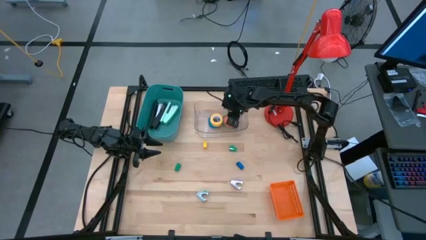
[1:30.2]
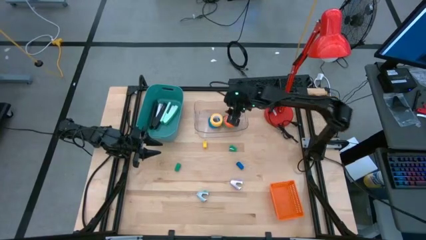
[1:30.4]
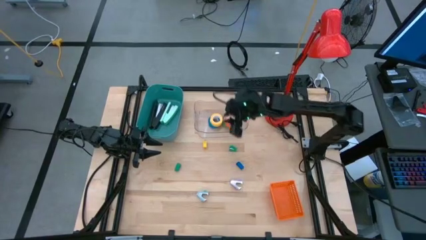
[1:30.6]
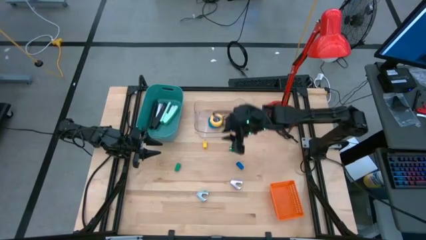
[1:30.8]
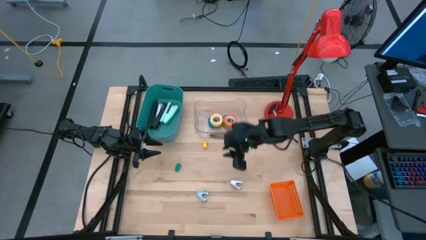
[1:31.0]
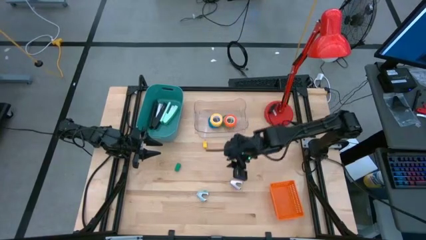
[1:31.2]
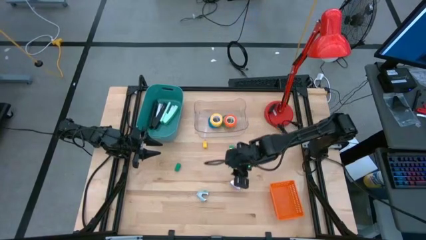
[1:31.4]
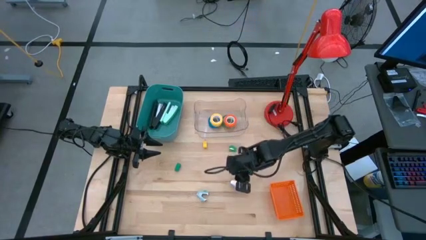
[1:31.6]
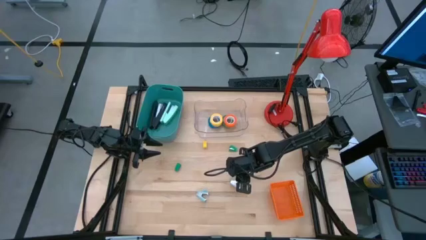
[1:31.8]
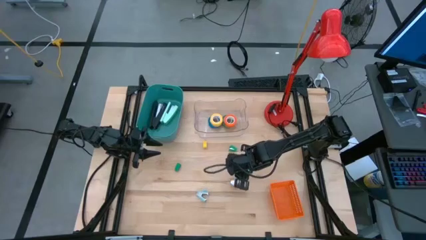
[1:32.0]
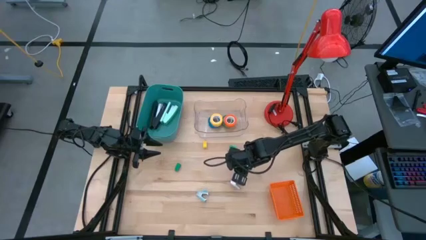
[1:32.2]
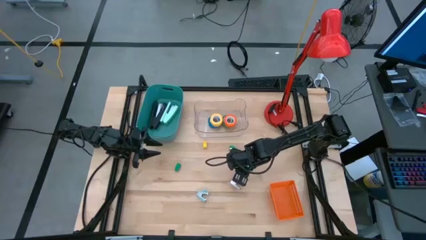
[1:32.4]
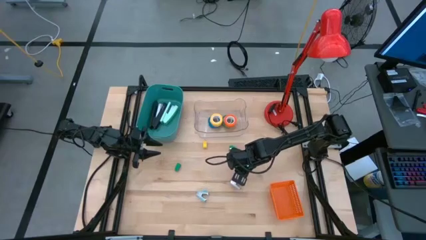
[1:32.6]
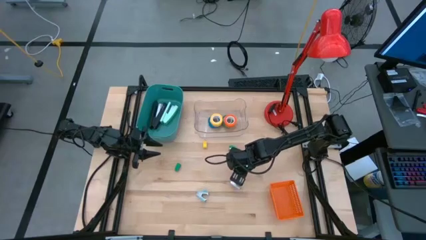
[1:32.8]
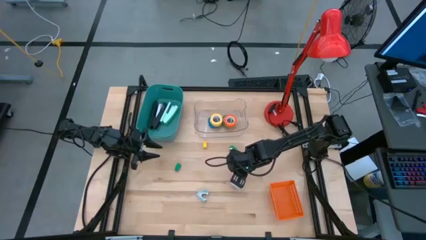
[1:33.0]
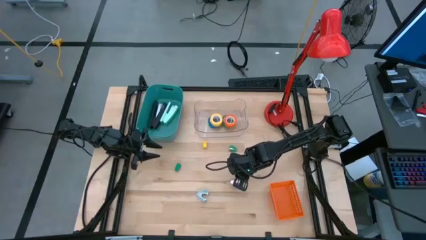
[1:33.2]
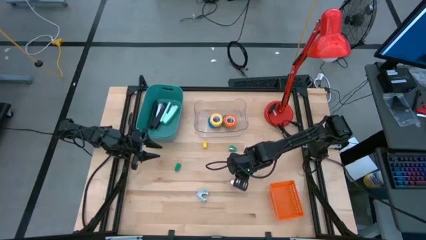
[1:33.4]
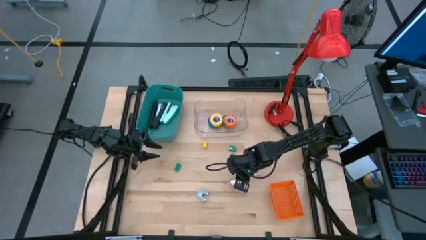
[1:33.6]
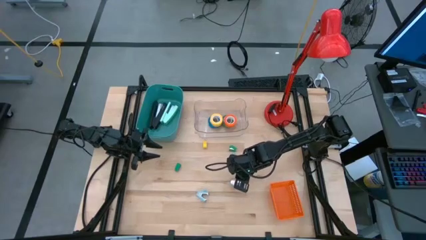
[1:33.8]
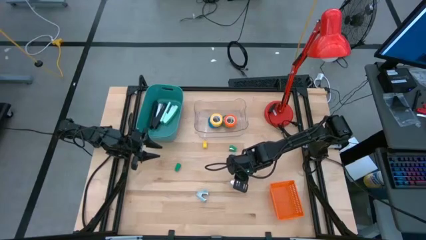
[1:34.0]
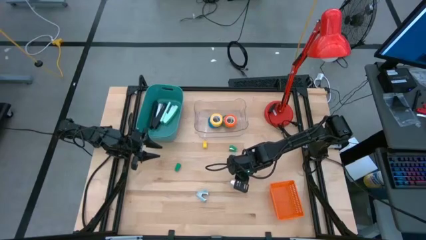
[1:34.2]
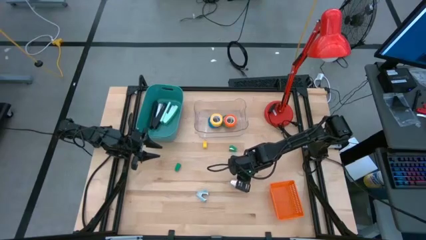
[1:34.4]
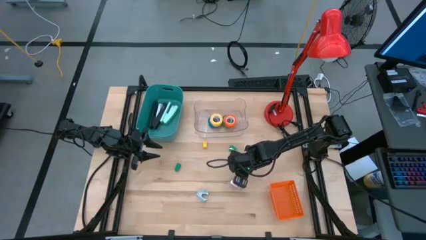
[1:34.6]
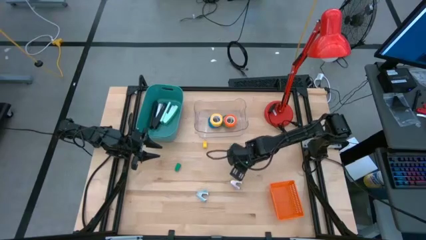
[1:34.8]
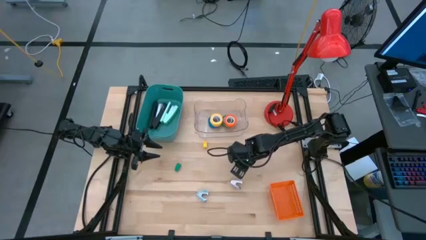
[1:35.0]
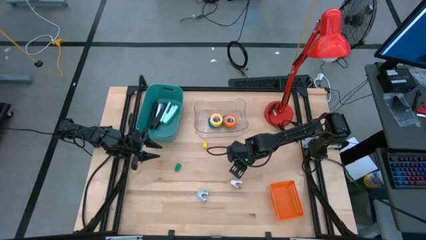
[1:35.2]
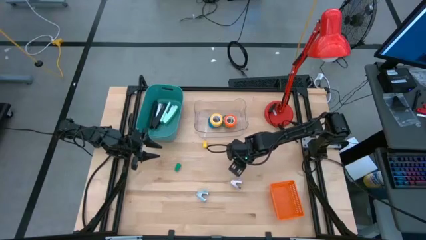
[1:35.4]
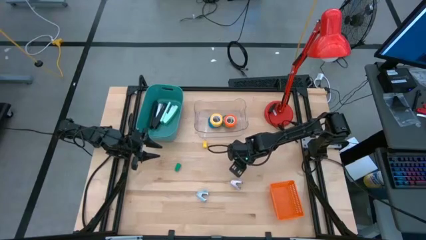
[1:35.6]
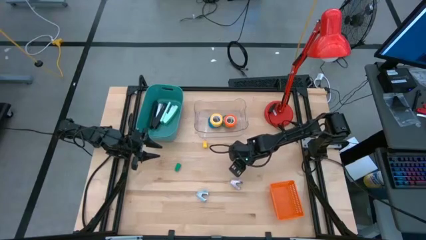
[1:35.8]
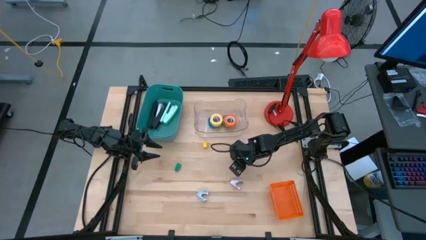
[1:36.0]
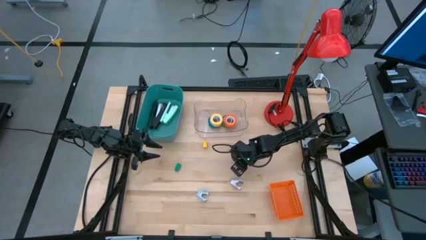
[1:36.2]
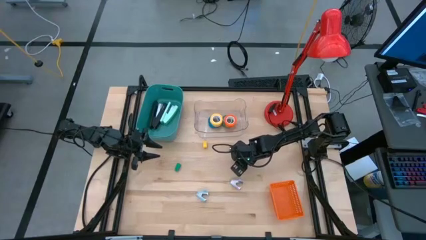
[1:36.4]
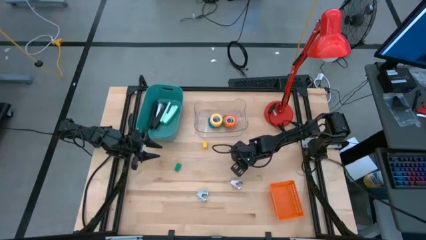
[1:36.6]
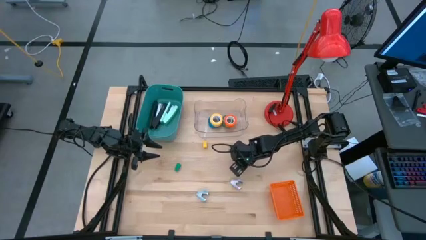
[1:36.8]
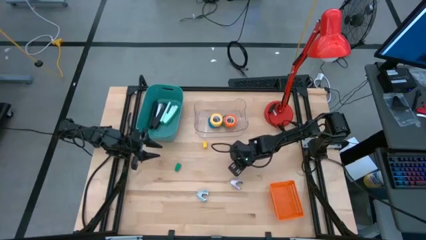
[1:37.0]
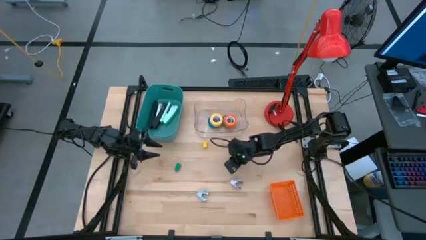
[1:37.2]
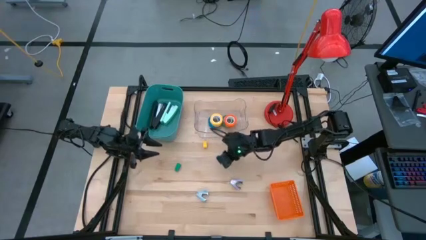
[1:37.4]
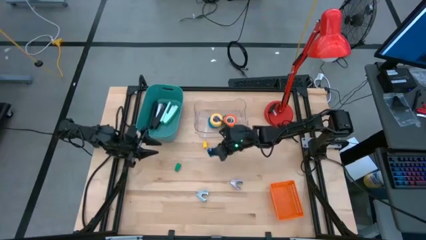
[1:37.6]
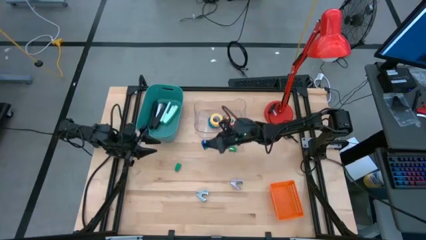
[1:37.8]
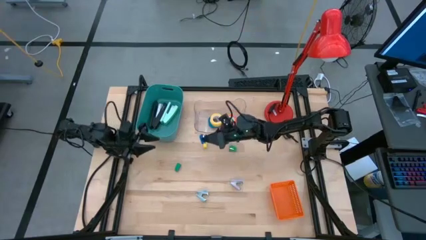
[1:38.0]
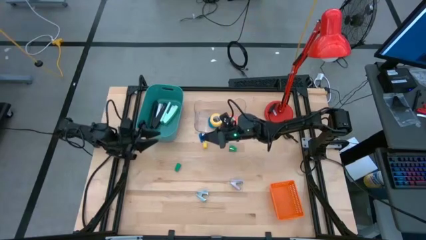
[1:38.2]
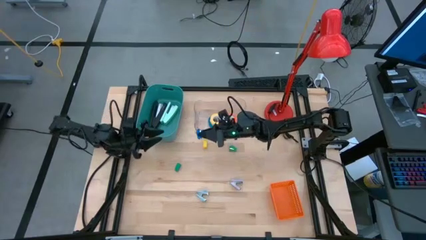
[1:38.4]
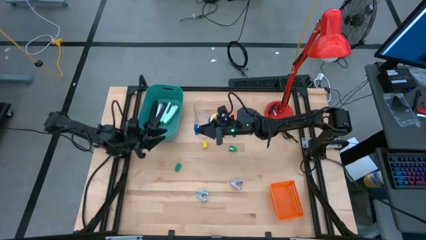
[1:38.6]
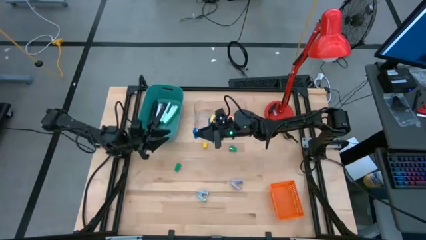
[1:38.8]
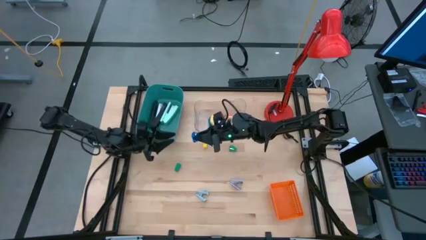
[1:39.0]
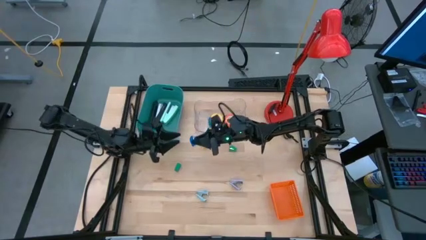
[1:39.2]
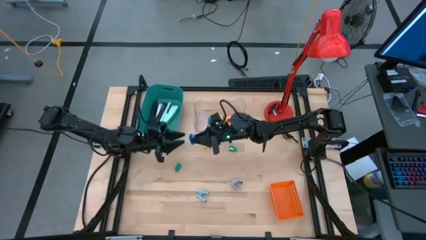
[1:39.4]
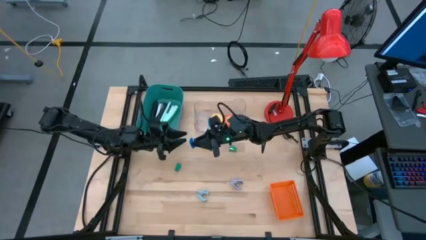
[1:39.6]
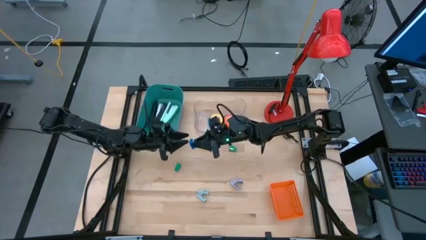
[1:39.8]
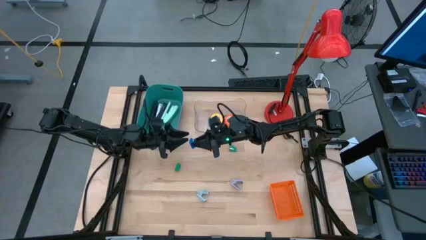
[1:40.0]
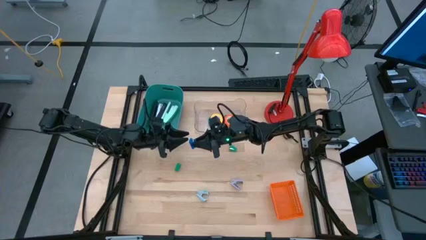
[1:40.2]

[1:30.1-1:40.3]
Task: Pick and place Stapler, Stapler remover, tape
Put the blue stapler remover into the green bin
